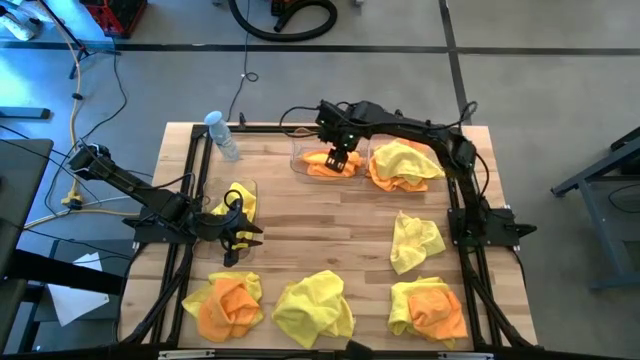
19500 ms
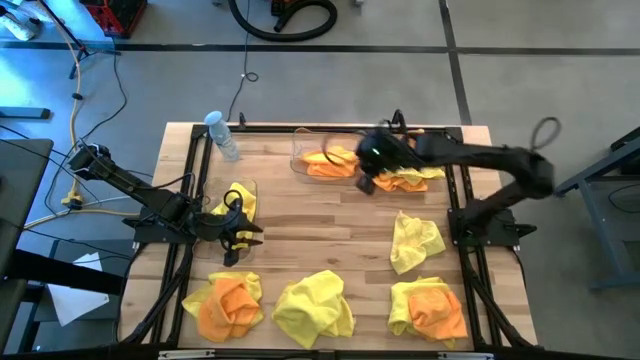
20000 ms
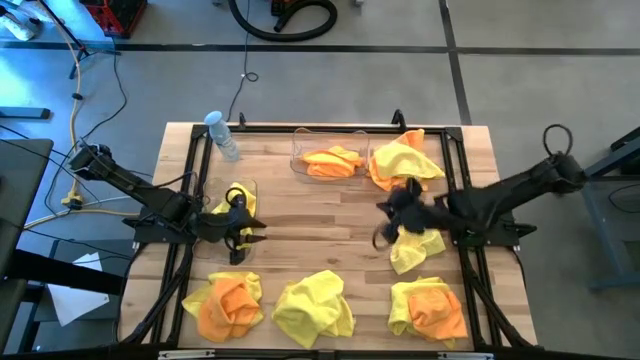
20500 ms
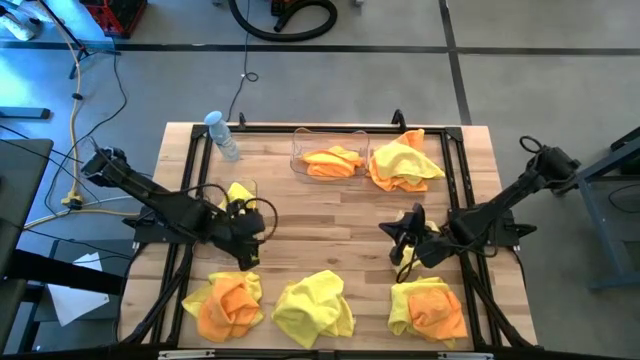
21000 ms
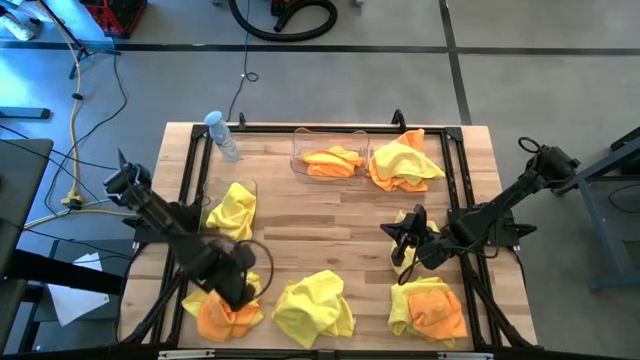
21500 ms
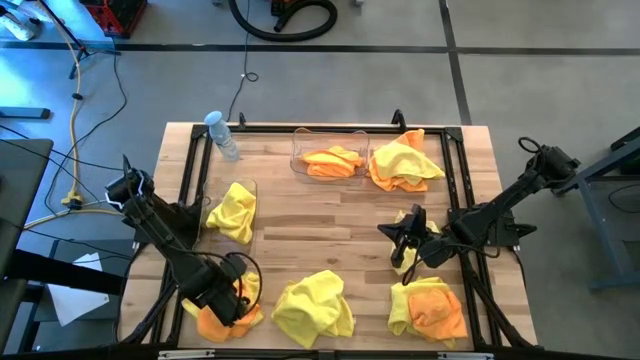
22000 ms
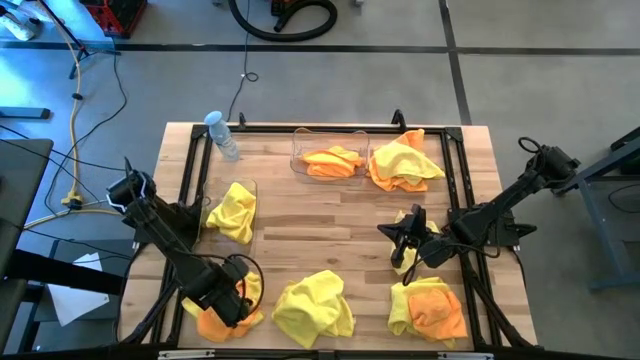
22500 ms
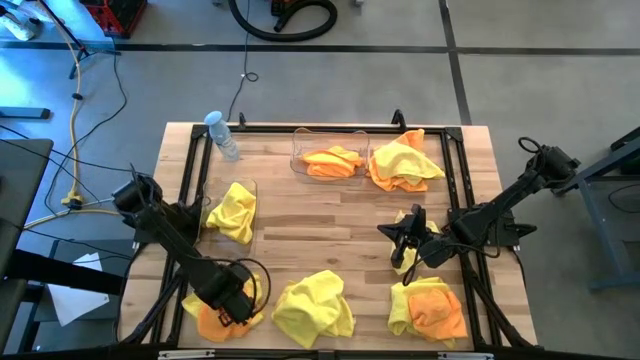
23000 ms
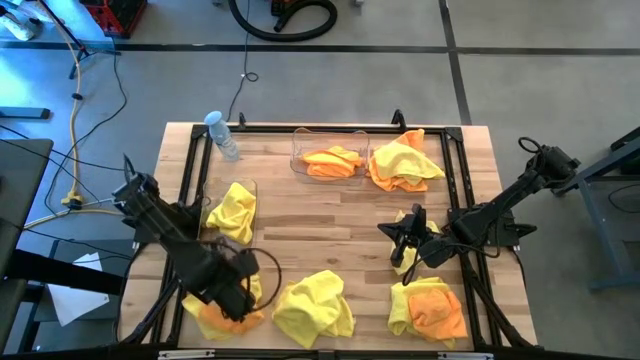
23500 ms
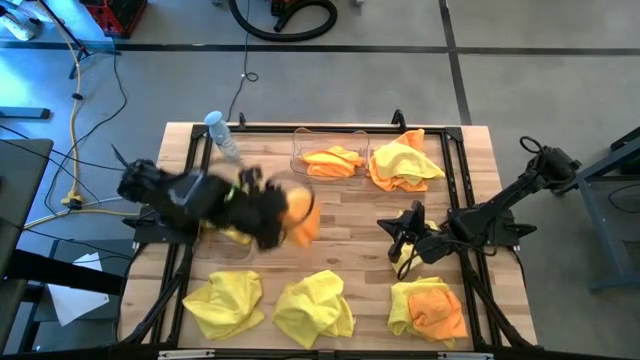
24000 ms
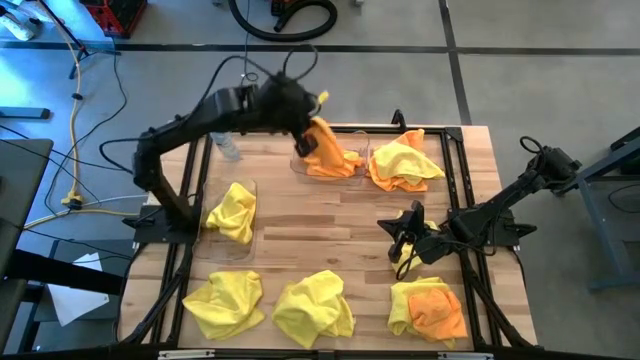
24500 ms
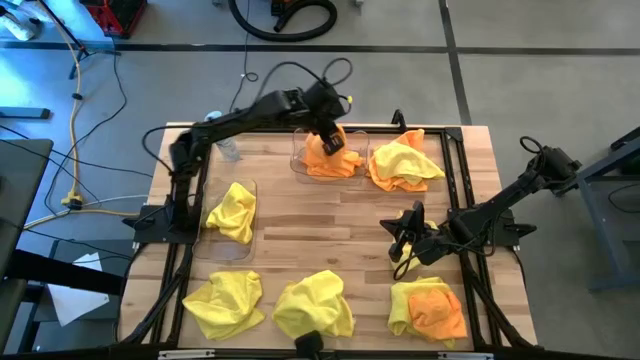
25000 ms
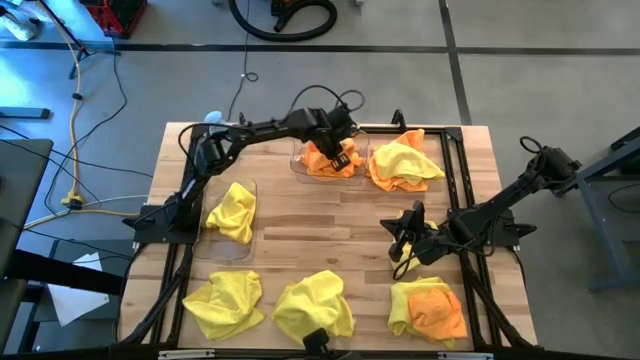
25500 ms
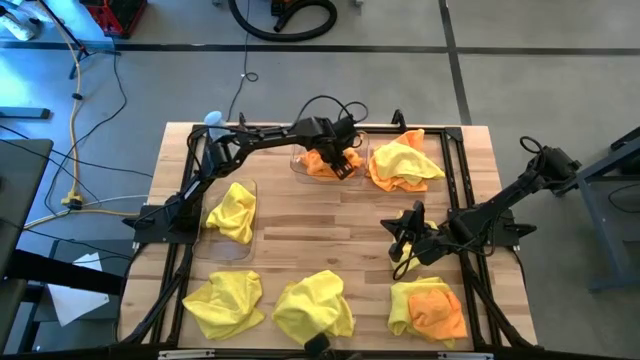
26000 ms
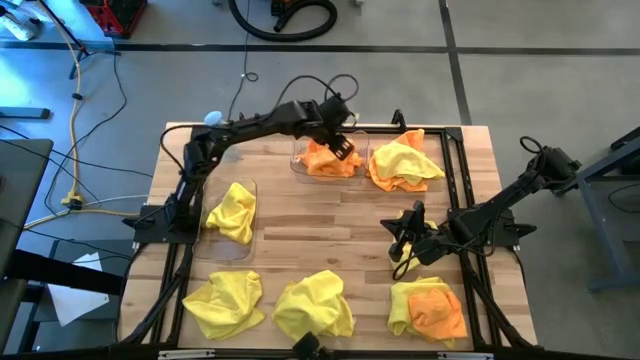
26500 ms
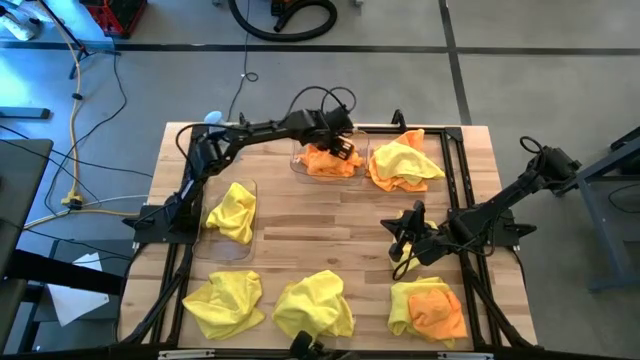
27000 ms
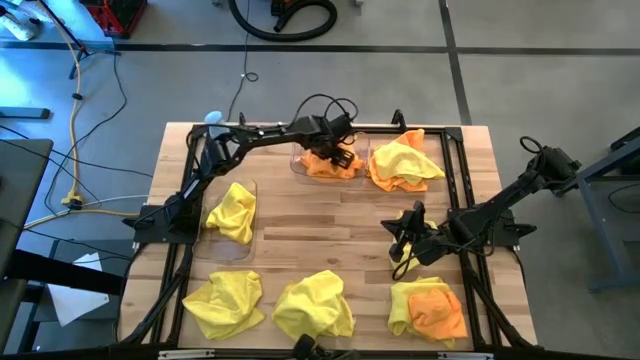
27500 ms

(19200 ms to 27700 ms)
Task: Sort microfiber towel by color & place in baskets
Put the orange microfiber towel into the top transparent bin

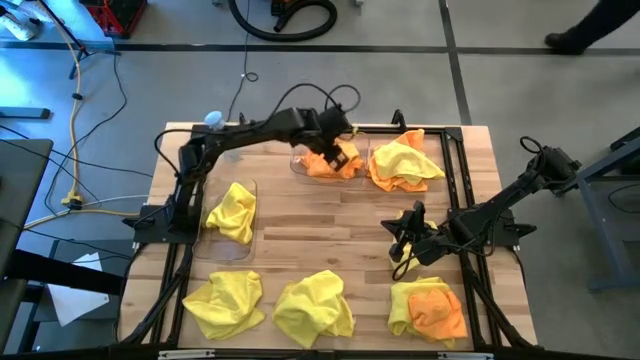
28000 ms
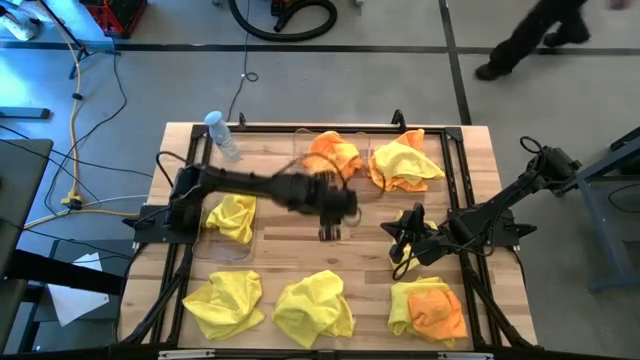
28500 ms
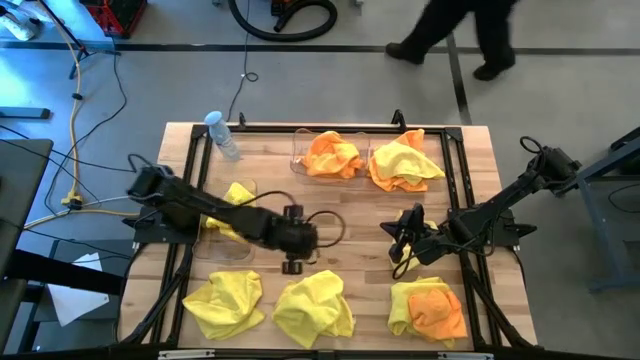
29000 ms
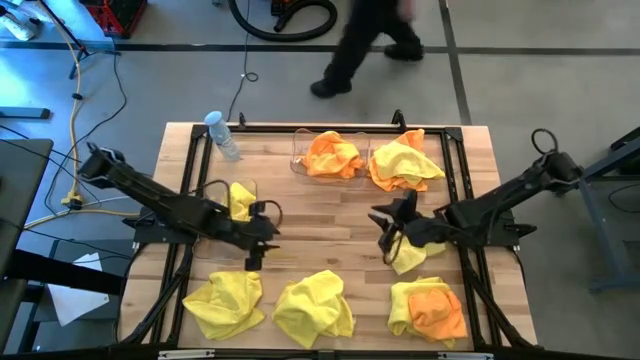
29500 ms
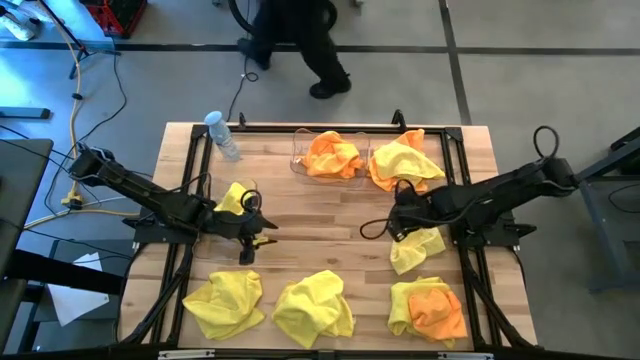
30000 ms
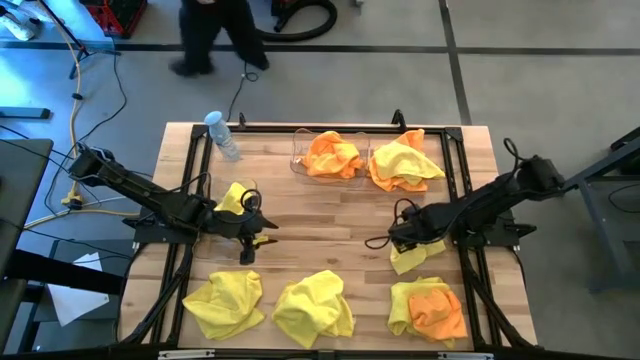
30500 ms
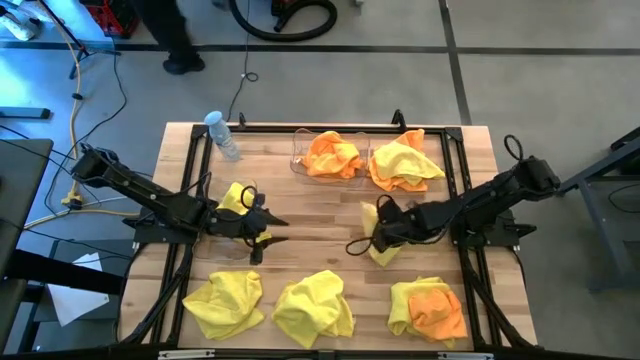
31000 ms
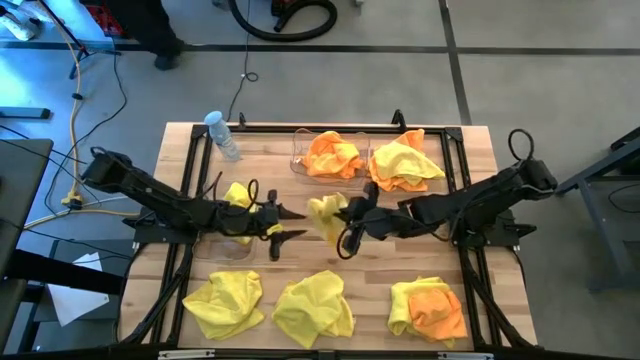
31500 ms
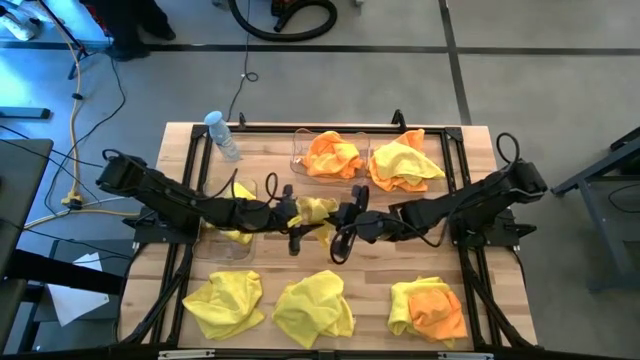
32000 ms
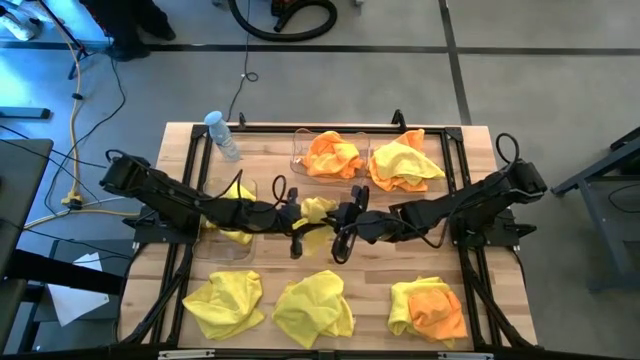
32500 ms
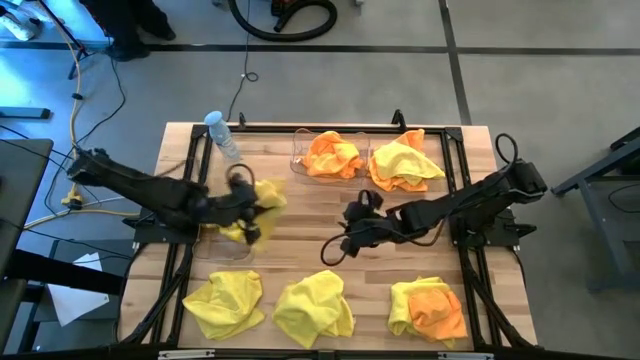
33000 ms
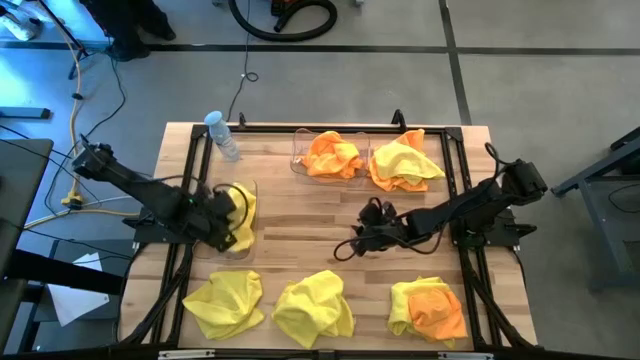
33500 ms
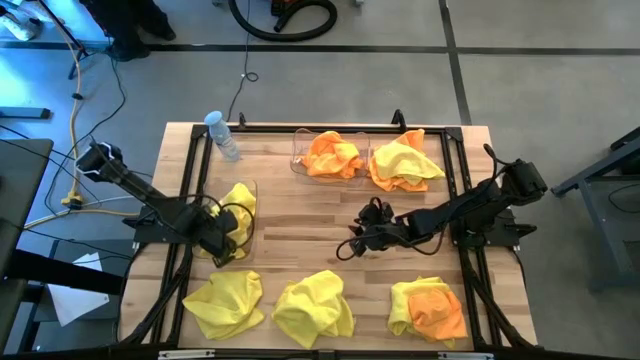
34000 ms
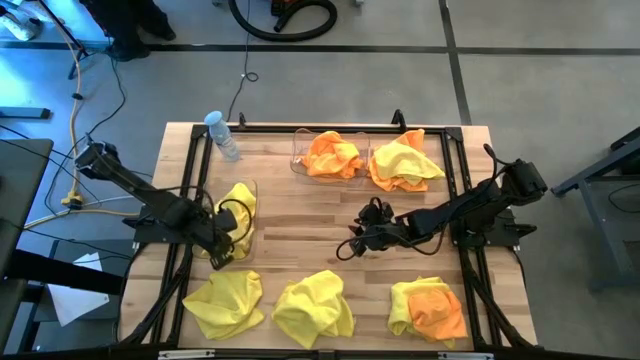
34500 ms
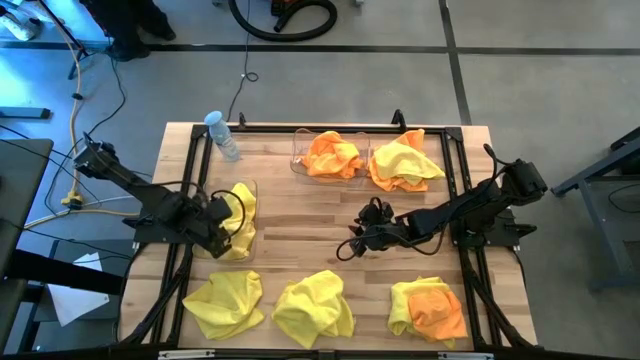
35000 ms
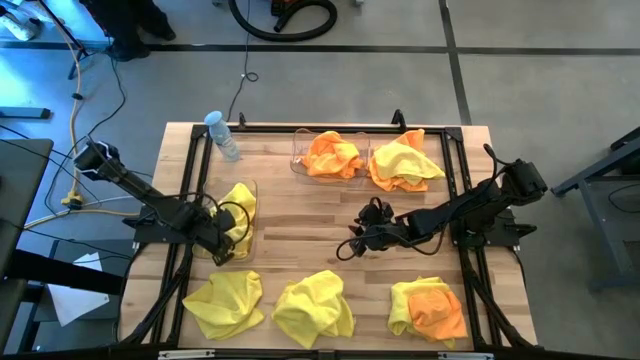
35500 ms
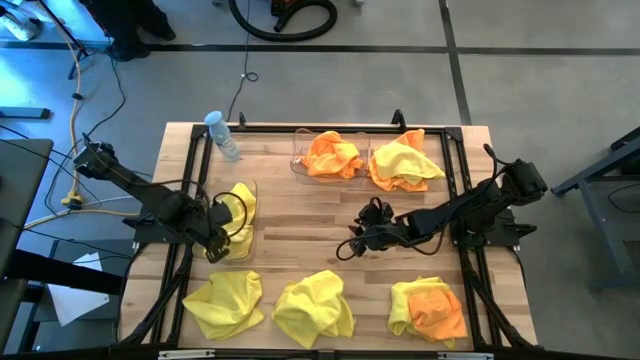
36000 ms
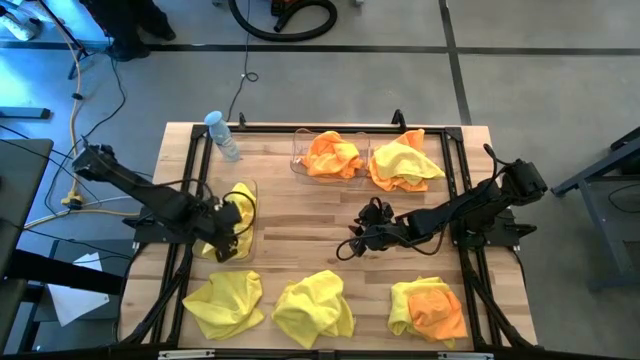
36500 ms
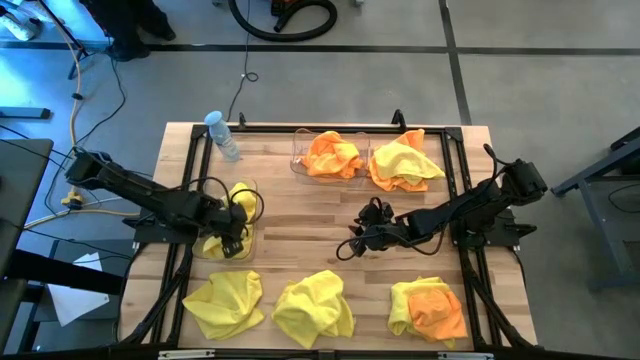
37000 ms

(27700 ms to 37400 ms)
Put the yellow microfiber towel into the bottom transparent bin

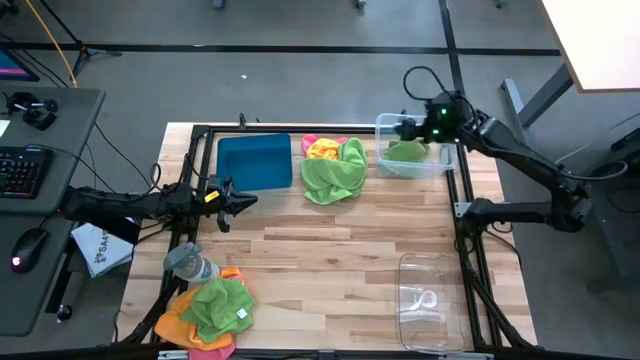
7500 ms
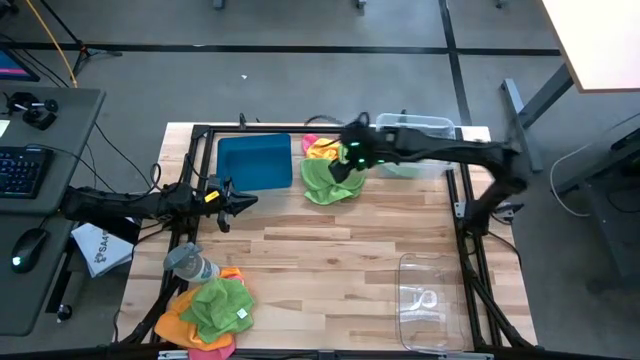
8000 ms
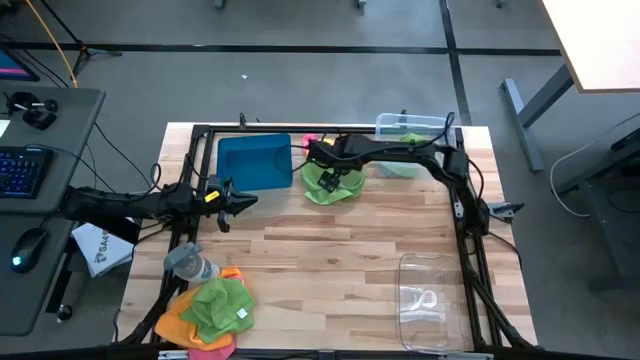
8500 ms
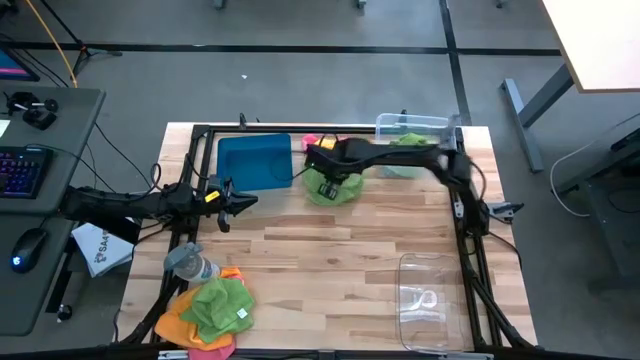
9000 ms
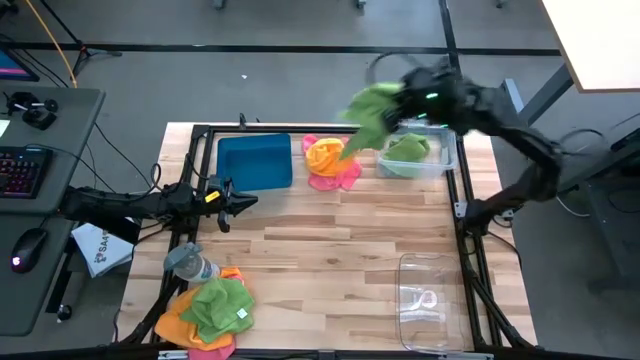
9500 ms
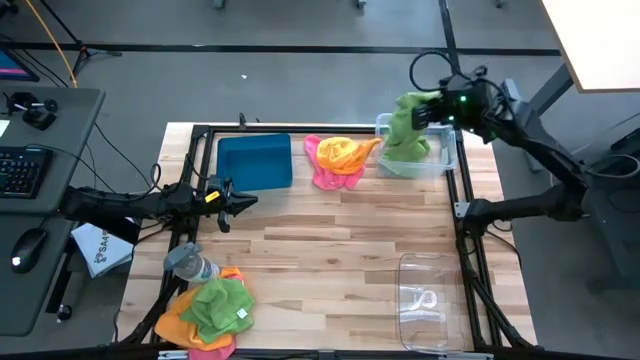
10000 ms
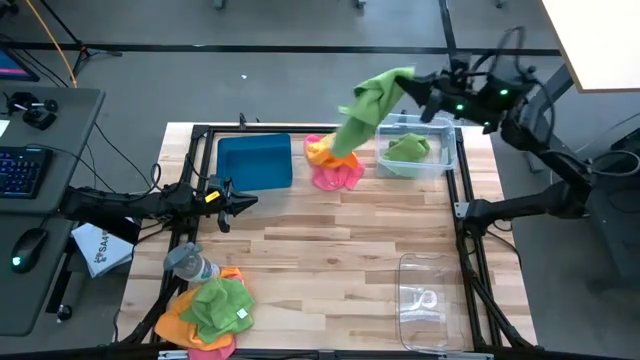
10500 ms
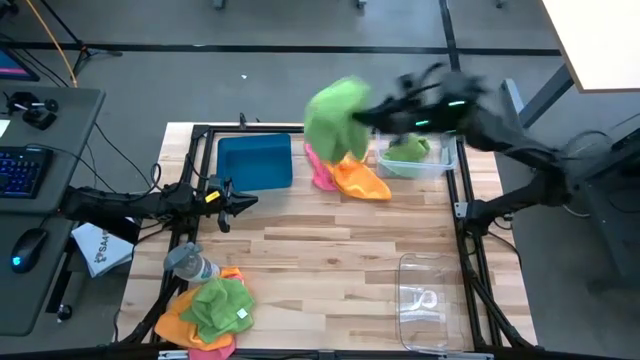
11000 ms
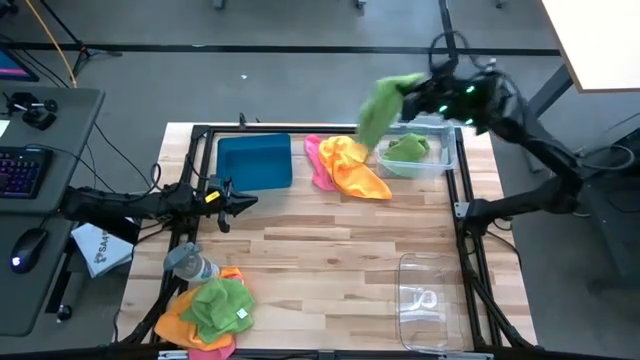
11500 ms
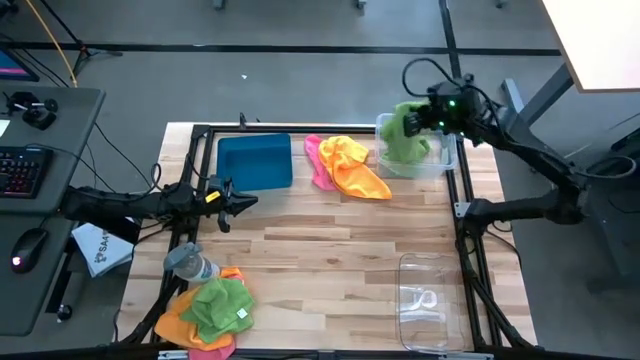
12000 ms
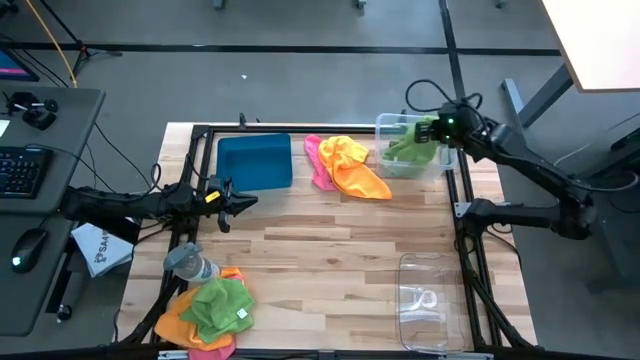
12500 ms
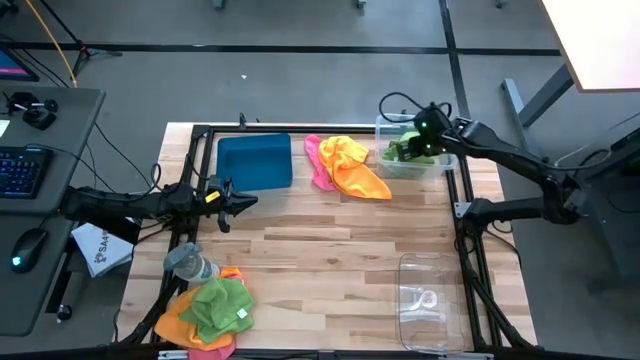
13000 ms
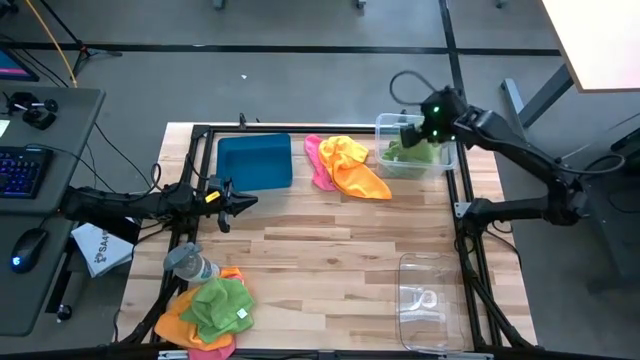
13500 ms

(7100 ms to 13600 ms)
Task: Sort microfiber towel by color & place in baskets
Put the top green towel into the top transparent bin
